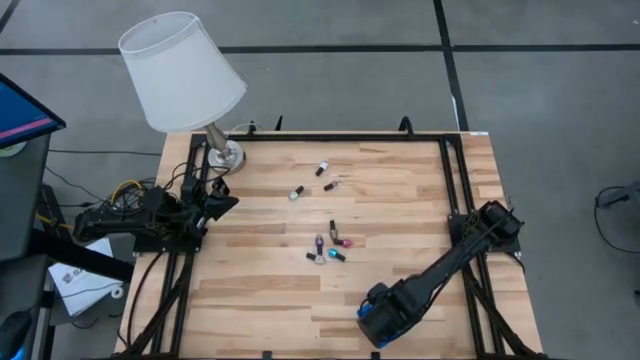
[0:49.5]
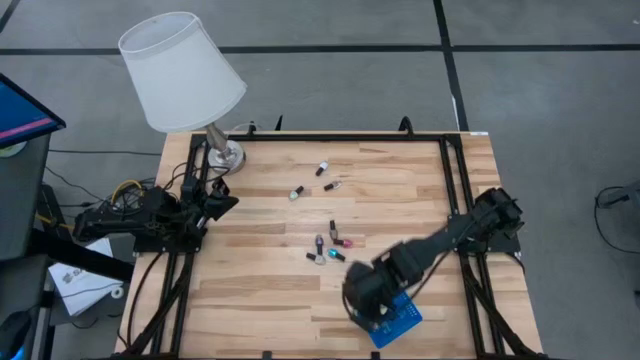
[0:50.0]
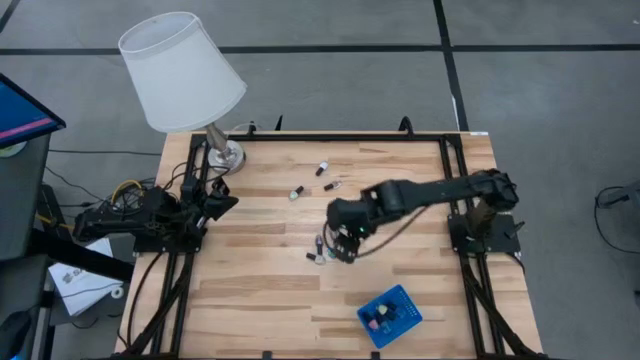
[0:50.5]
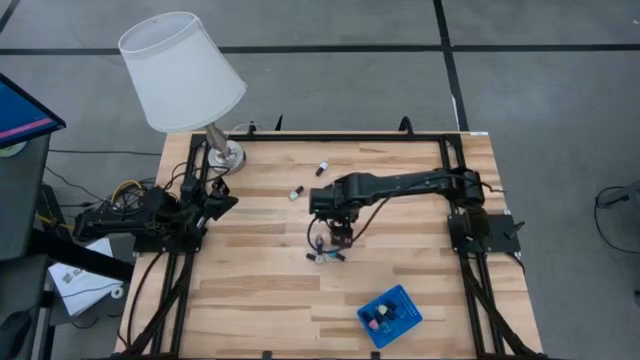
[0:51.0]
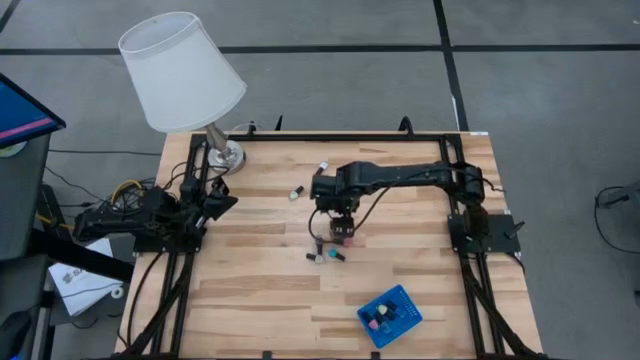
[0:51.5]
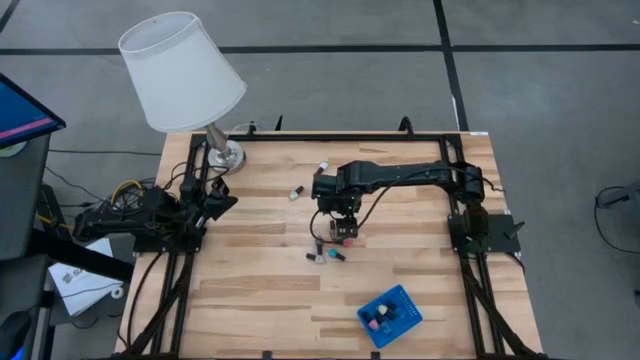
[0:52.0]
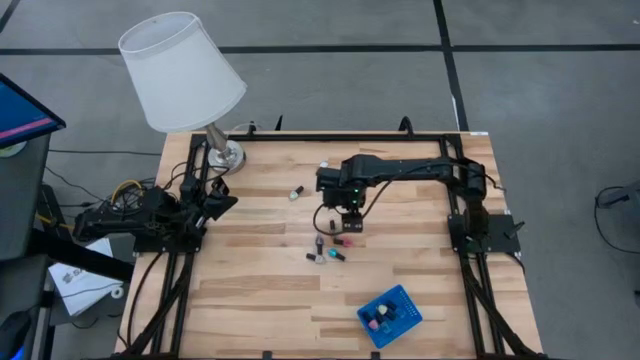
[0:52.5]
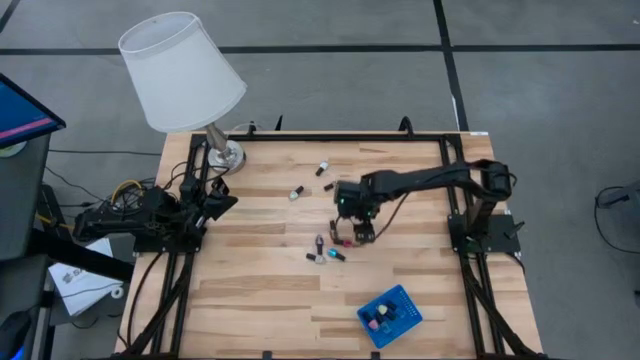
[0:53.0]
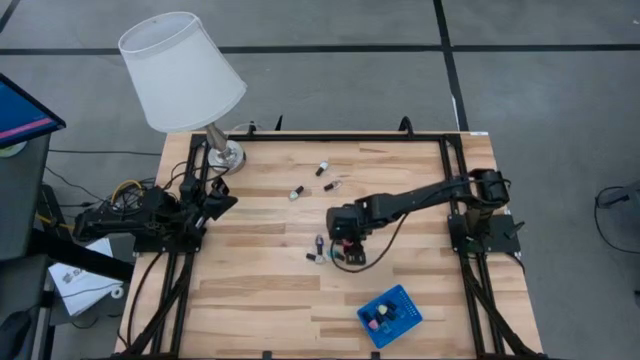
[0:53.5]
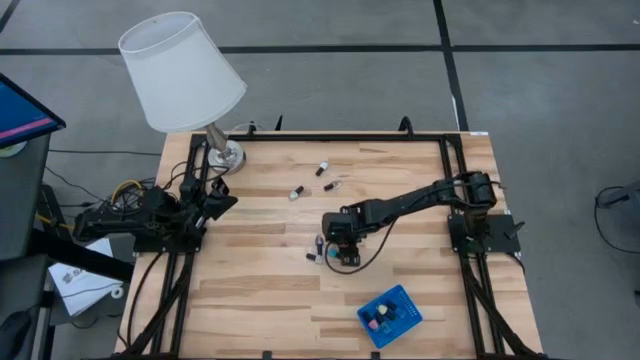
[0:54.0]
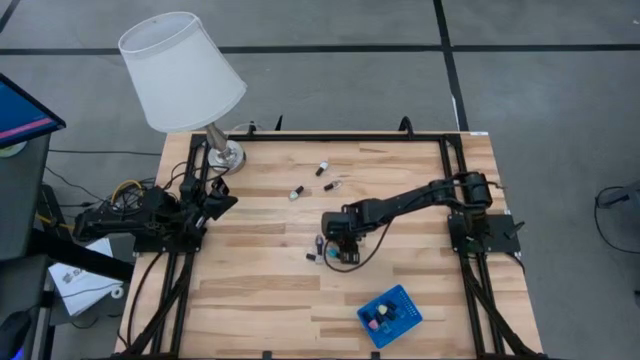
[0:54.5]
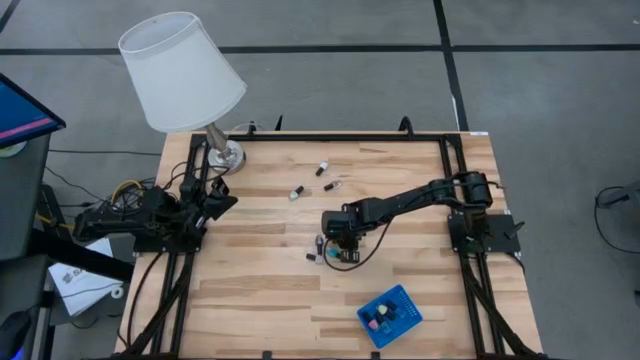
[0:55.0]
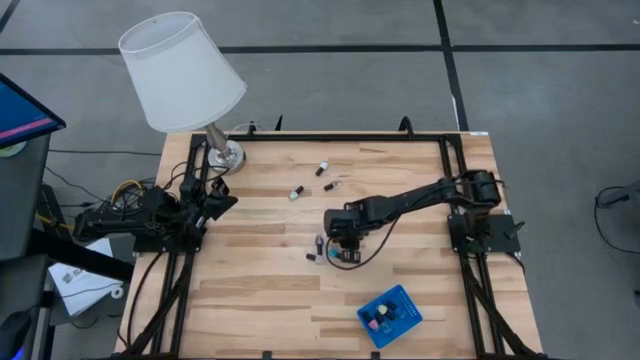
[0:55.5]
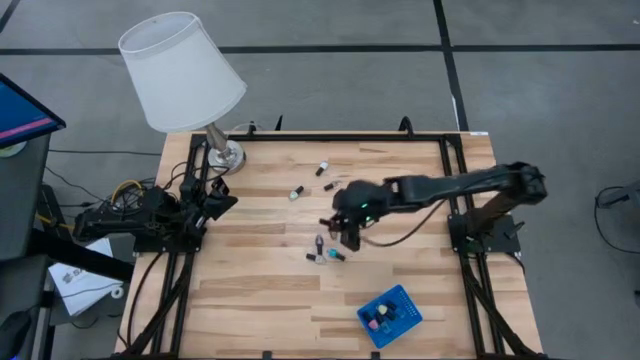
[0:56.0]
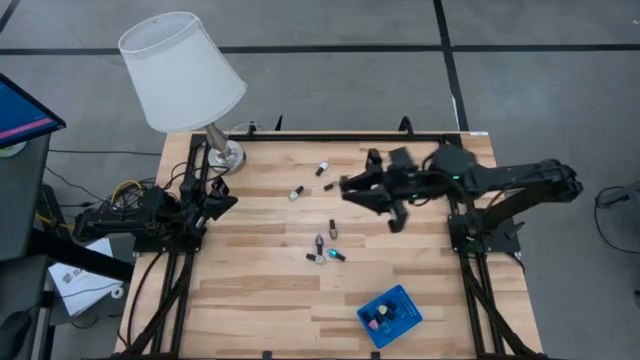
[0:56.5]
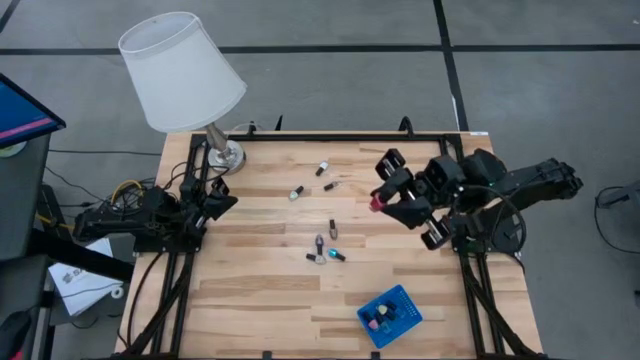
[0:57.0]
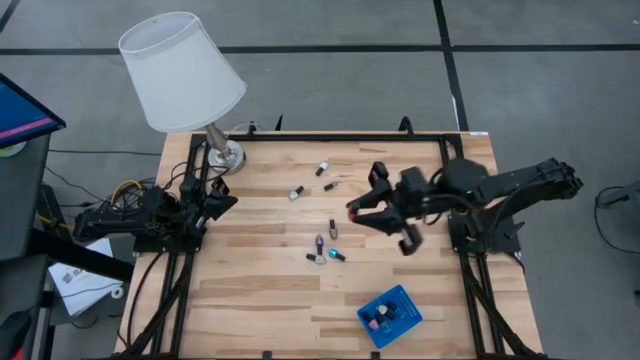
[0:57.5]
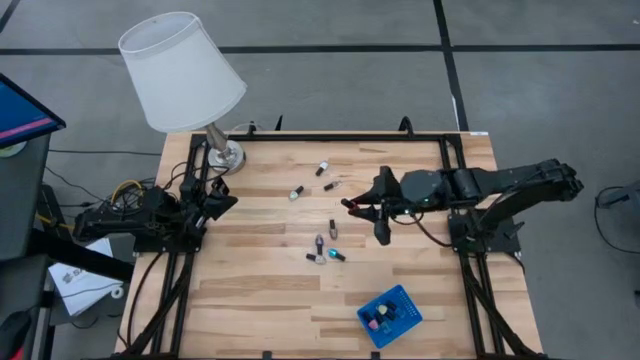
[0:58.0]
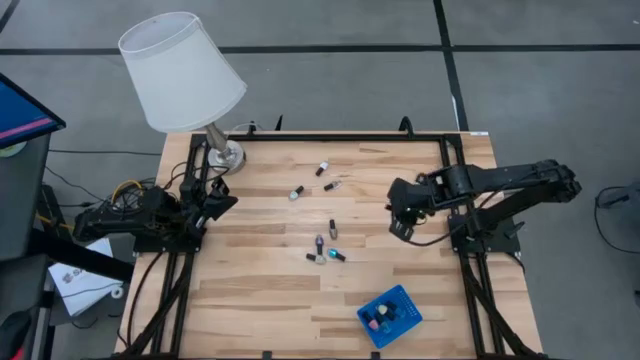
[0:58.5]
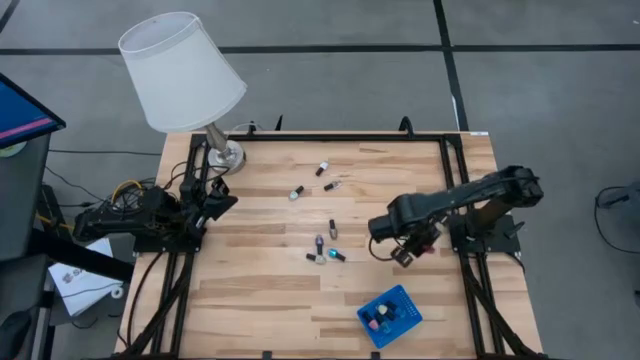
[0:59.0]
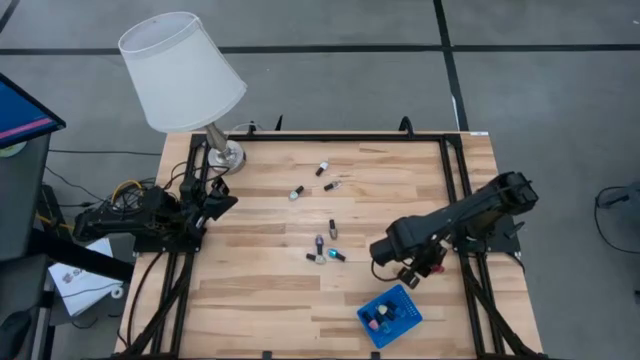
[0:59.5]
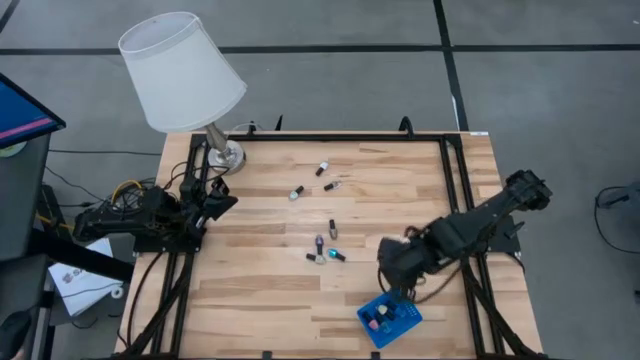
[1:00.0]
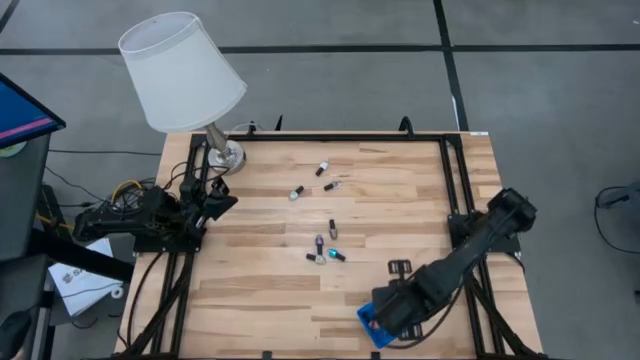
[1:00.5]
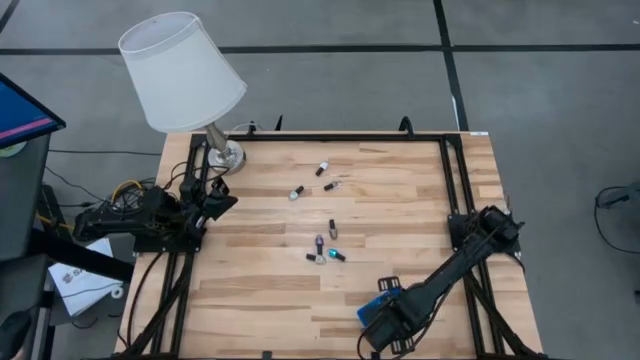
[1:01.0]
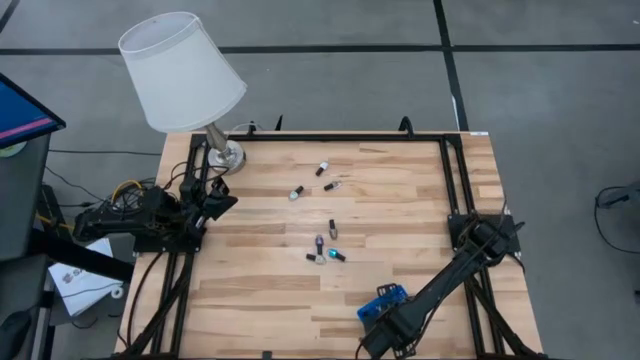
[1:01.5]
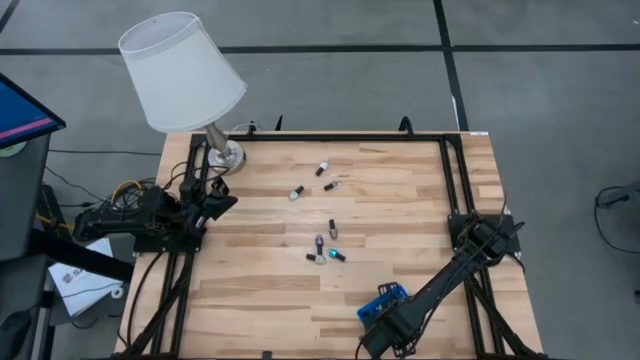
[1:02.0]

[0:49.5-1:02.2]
Task: Pick & Place Nail Polish
Put the red nail polish into the blue bin

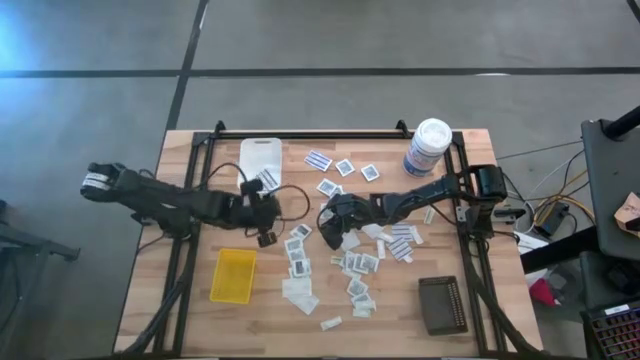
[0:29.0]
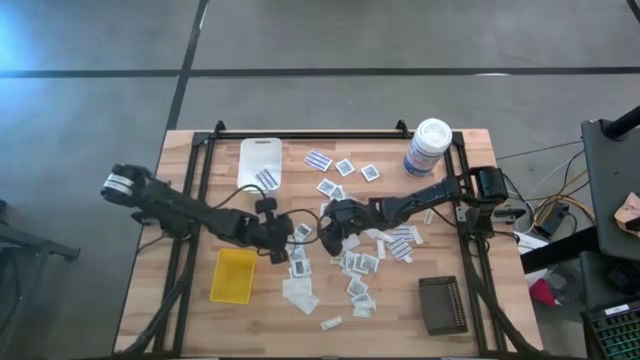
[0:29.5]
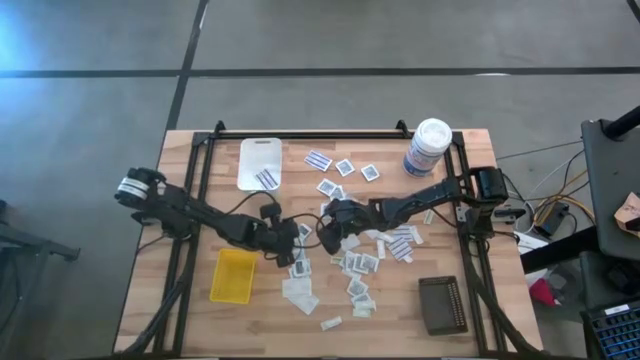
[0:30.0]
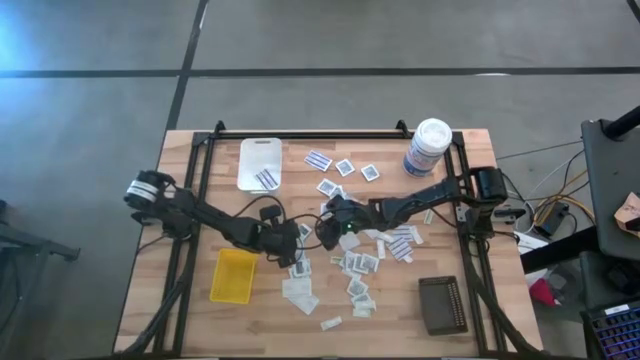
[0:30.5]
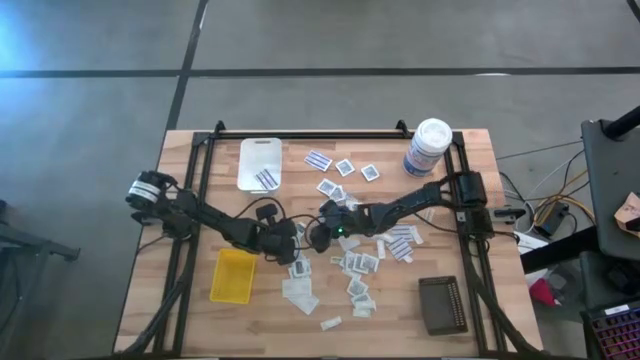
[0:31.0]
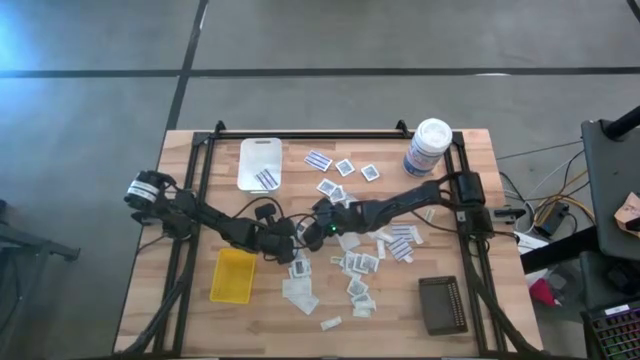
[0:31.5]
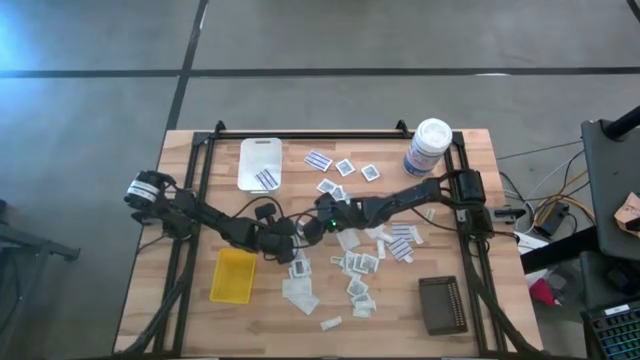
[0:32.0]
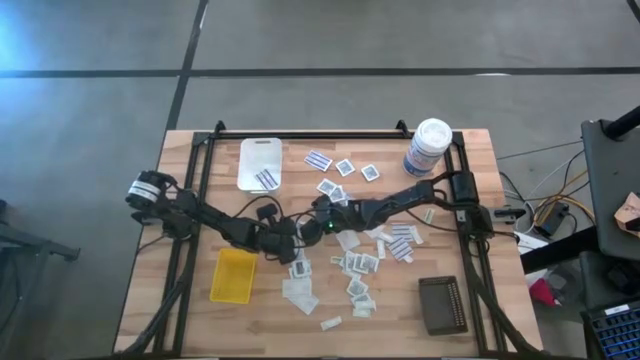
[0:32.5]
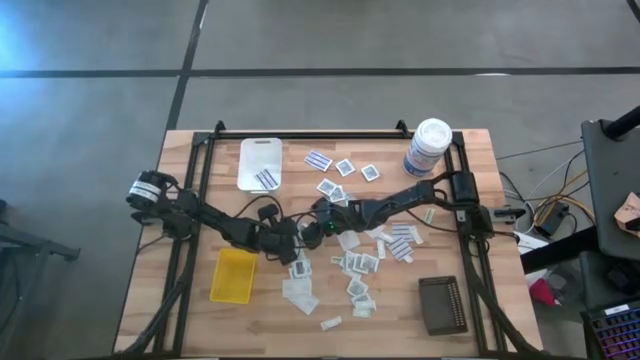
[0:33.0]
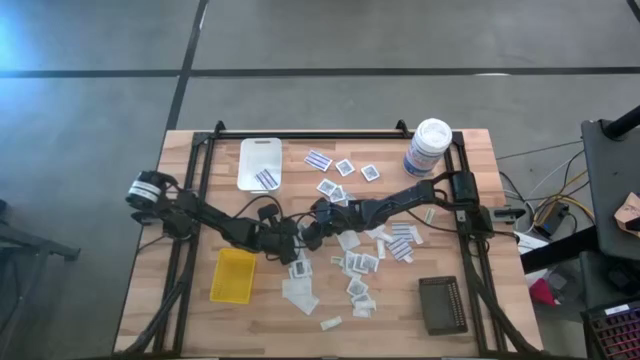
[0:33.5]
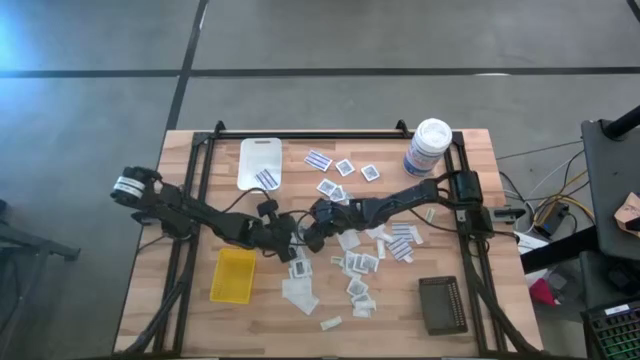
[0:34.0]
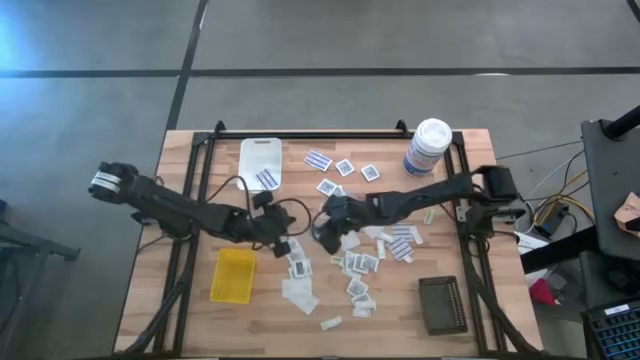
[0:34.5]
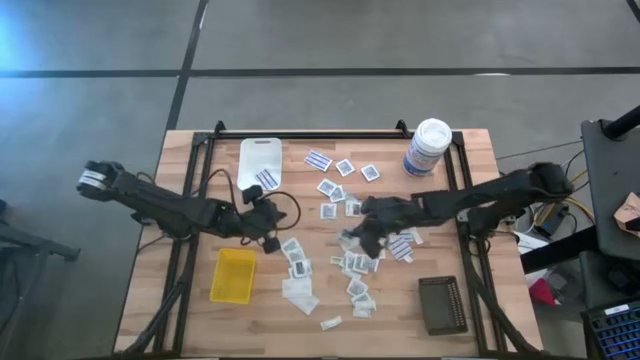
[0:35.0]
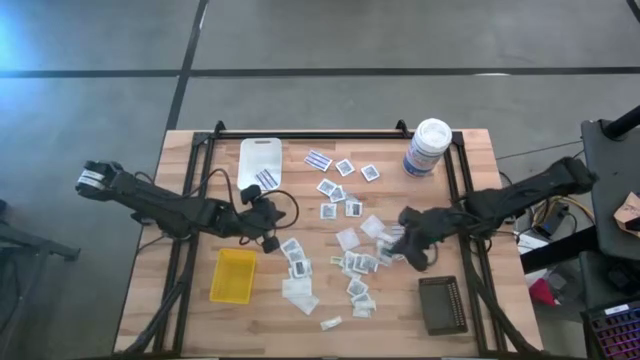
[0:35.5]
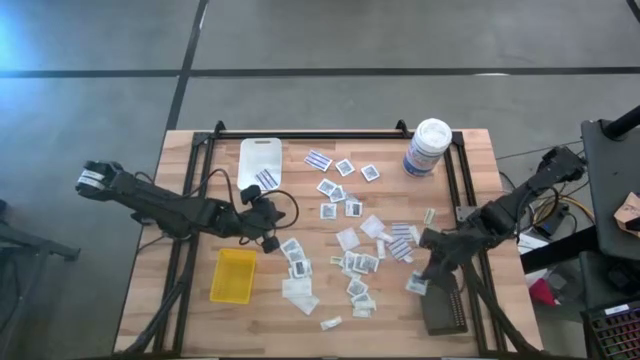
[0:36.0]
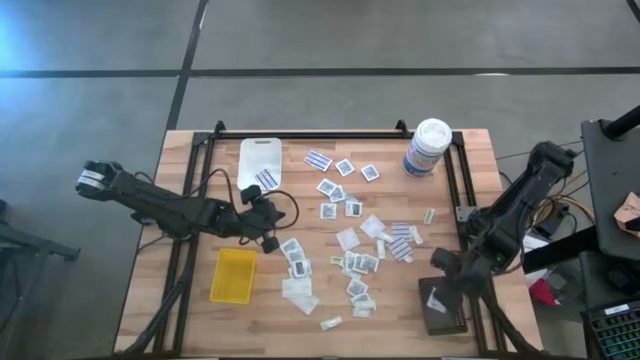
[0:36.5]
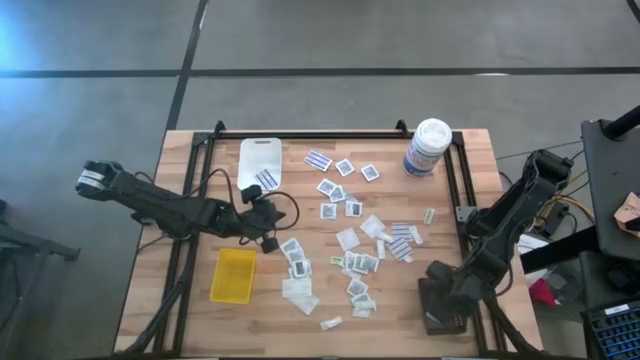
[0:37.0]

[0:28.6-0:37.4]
Task: Pick & Place First Aid Supplies
Put the towelette pack into the black bin
